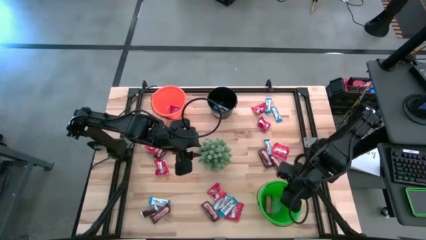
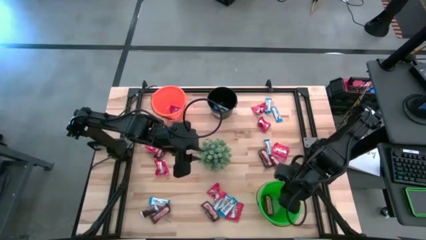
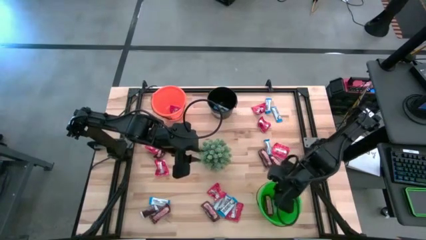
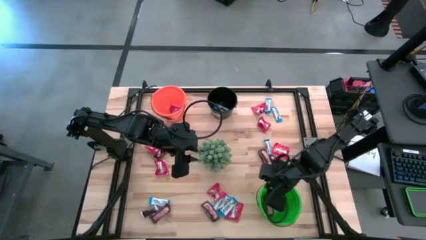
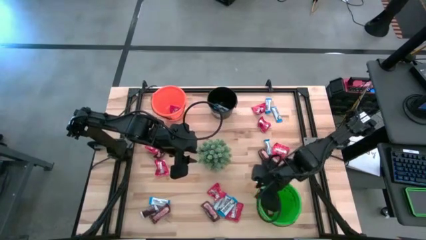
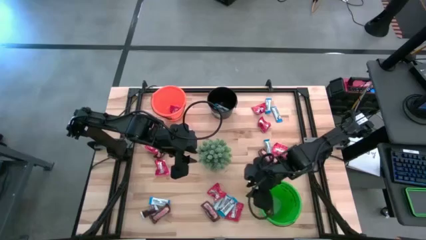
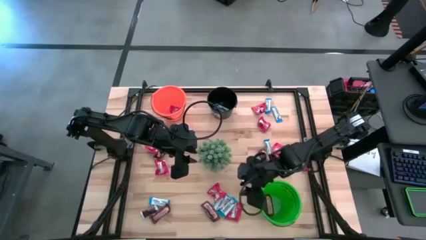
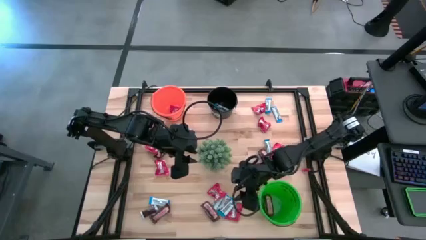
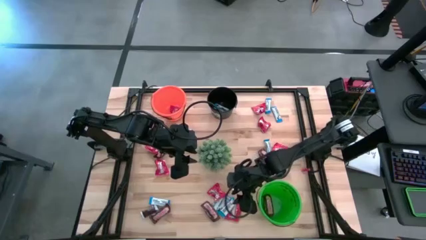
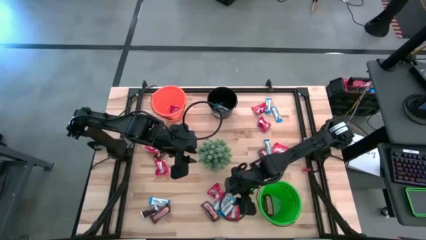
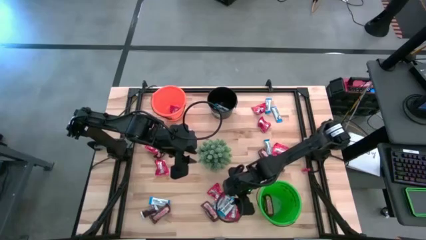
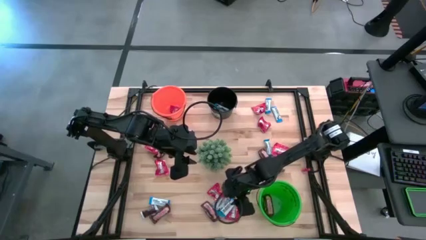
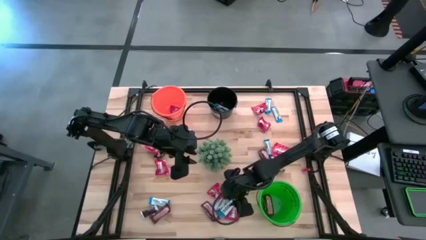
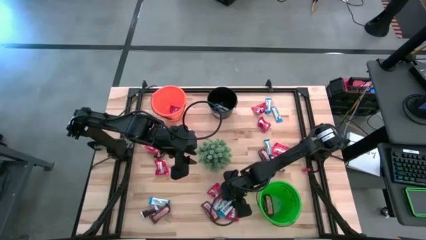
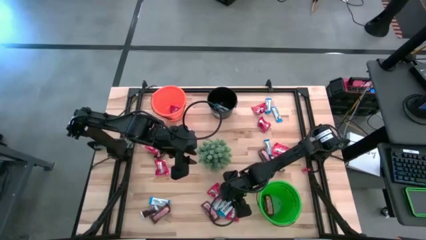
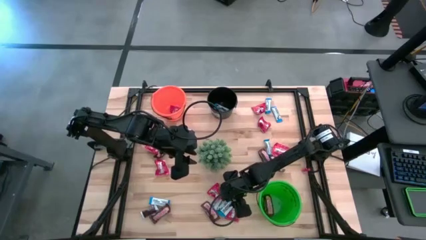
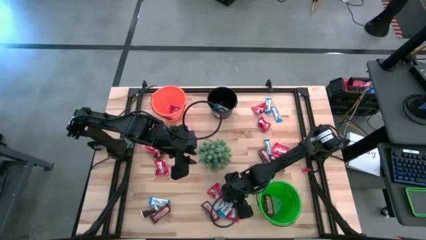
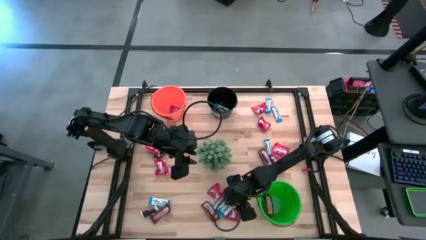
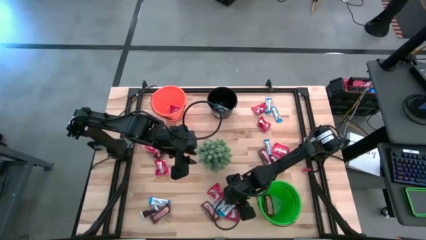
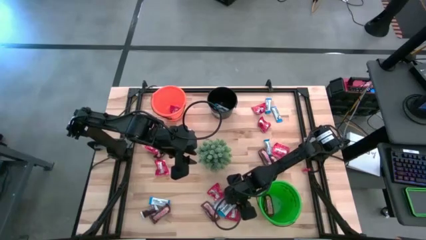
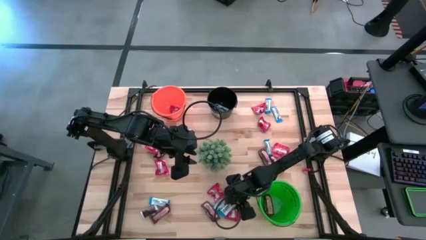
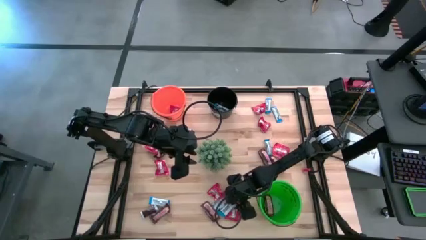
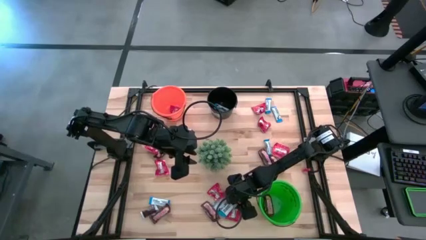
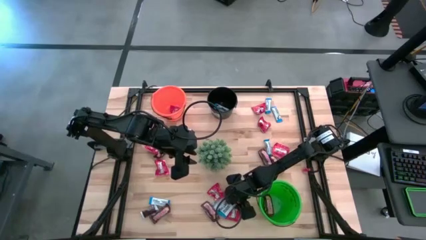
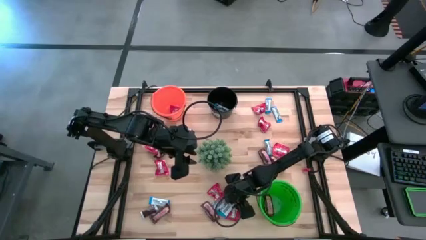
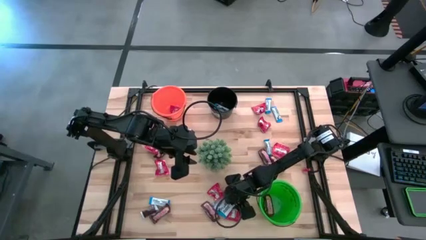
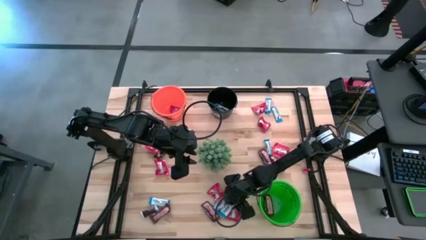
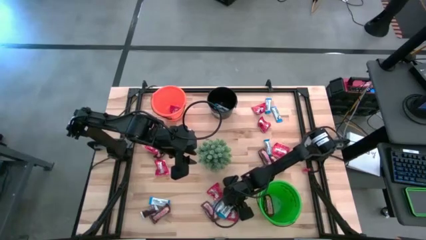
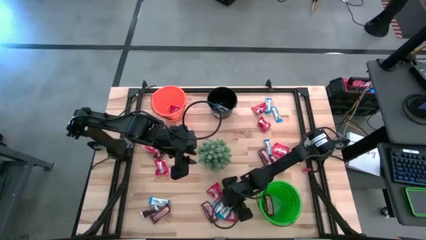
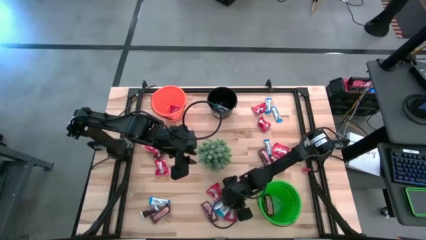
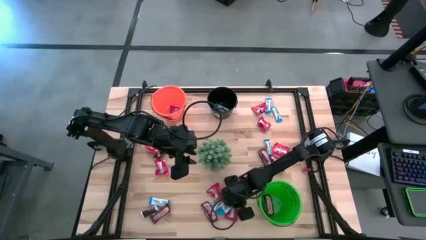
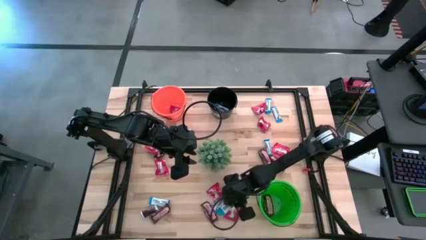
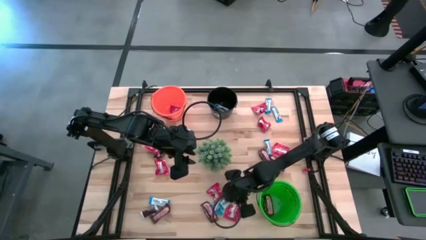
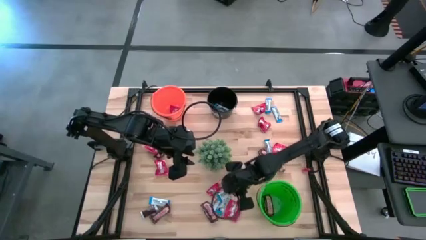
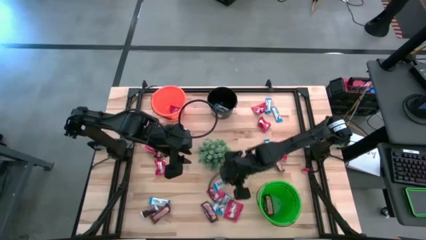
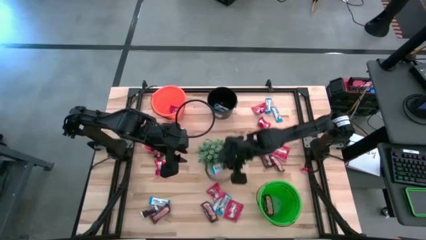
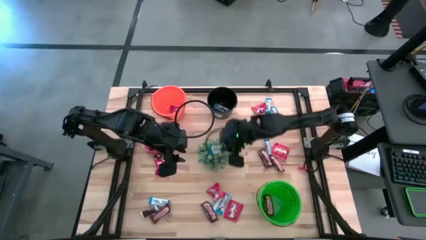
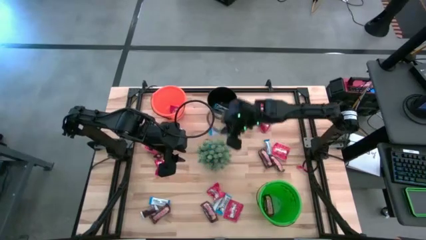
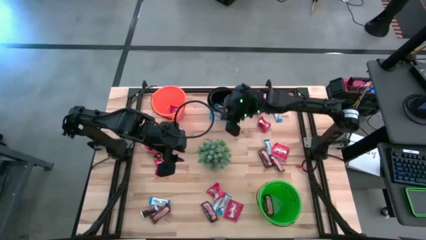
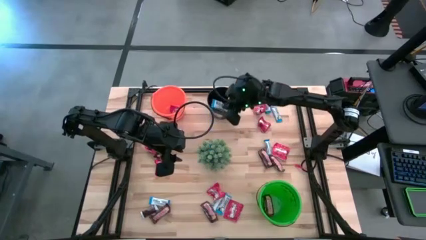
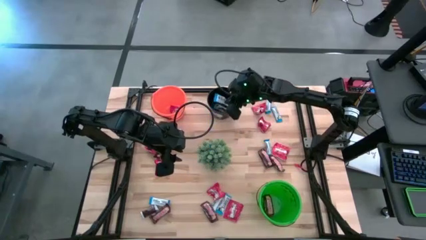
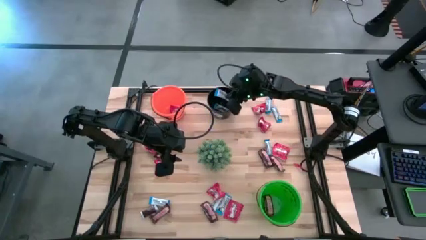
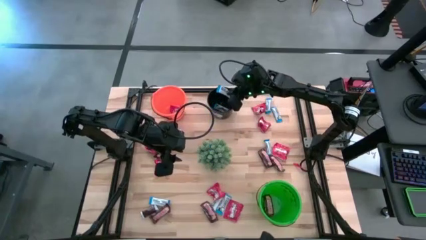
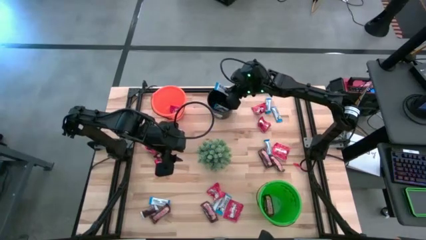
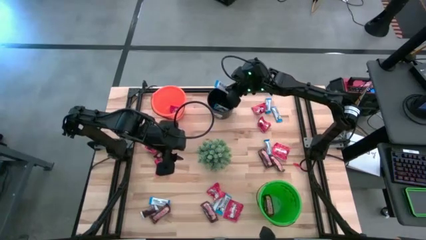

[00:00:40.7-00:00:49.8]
Task: Organize candy in baskets
Put the white chocolate bar into the black bucket

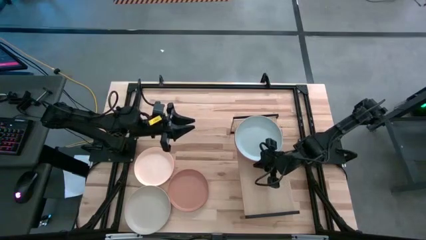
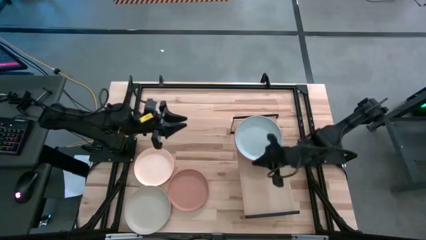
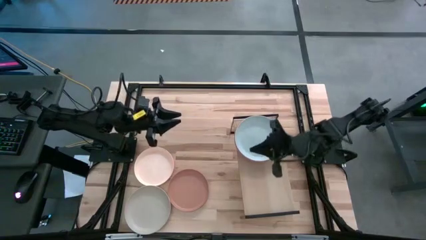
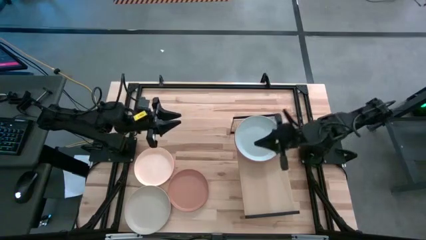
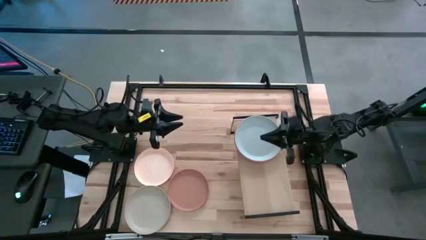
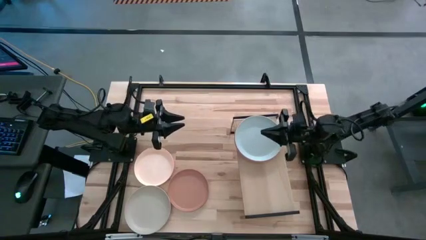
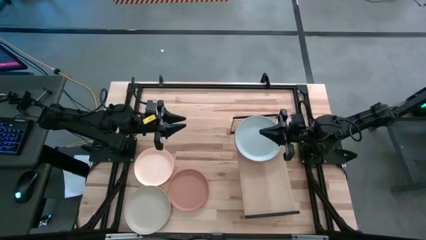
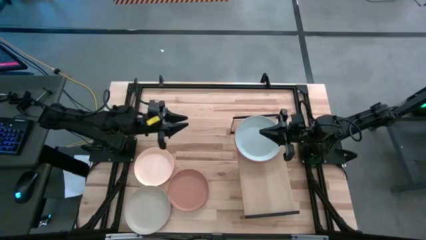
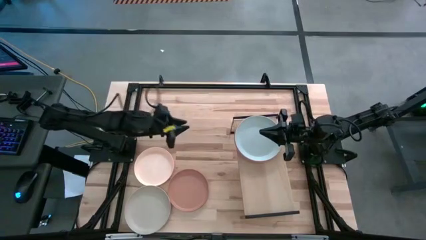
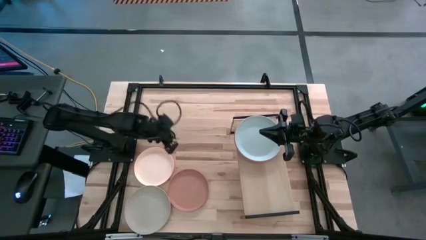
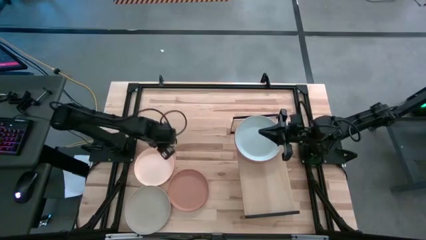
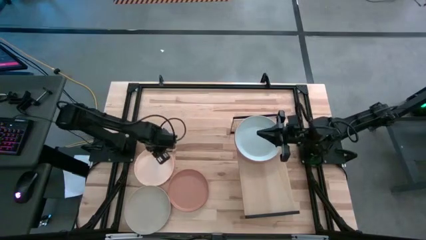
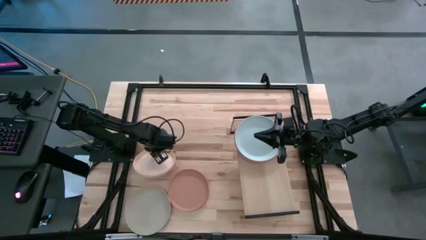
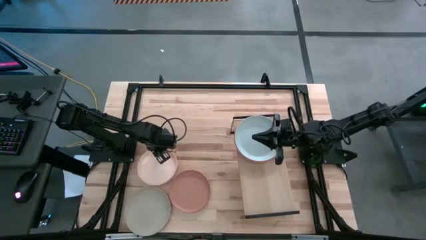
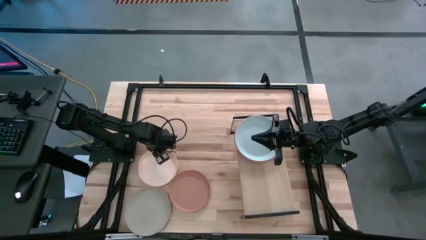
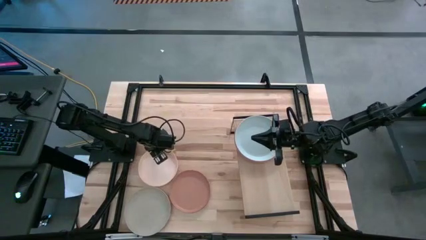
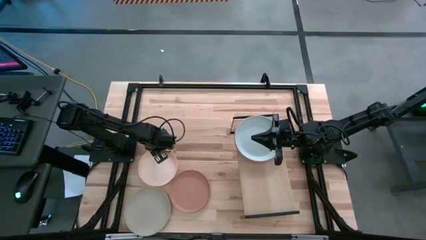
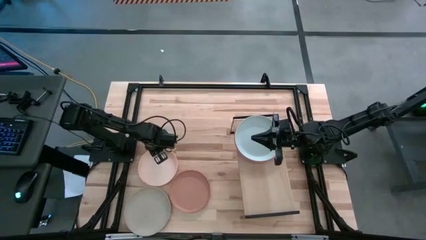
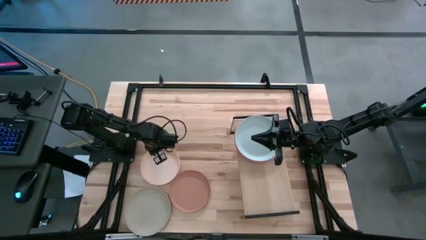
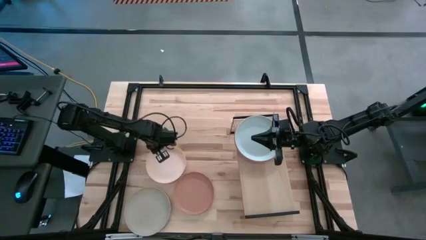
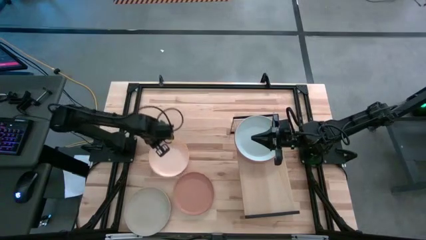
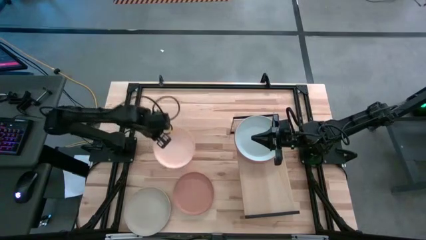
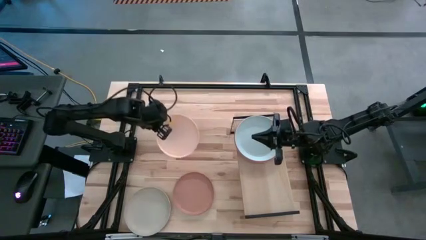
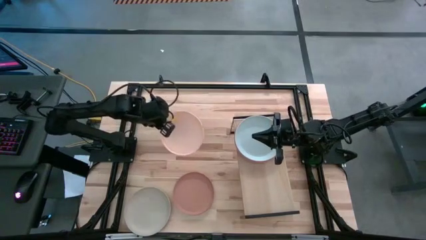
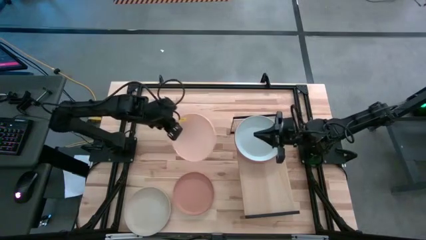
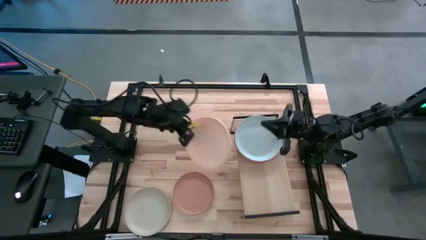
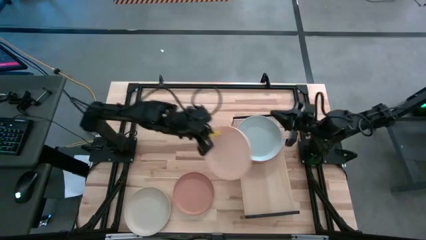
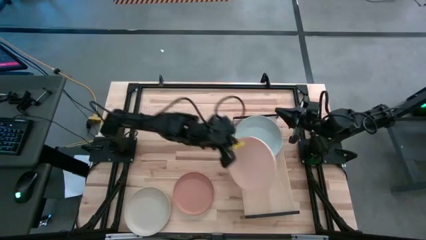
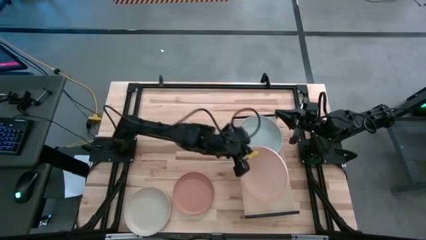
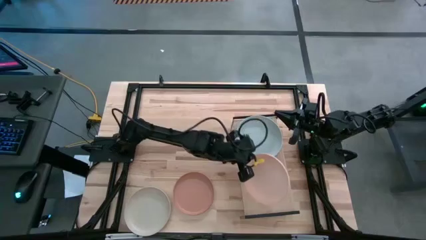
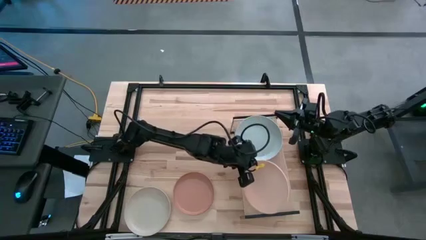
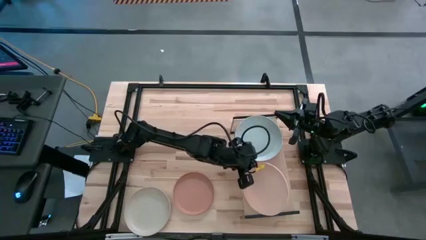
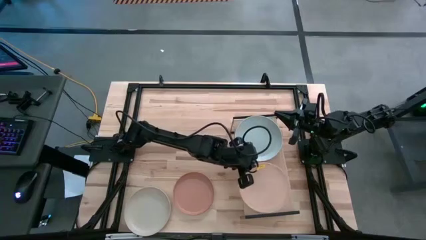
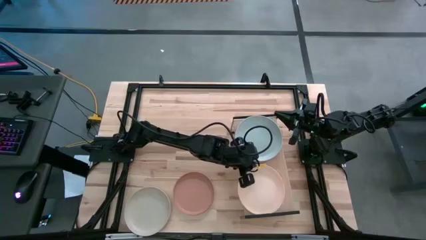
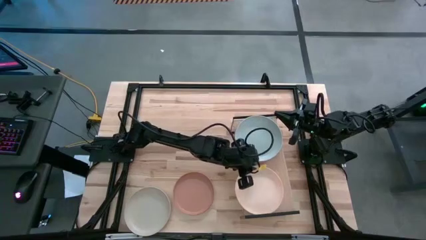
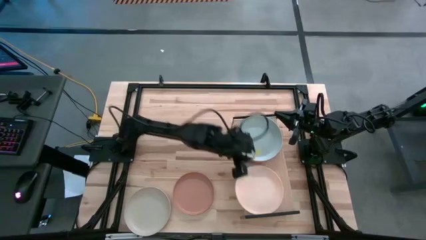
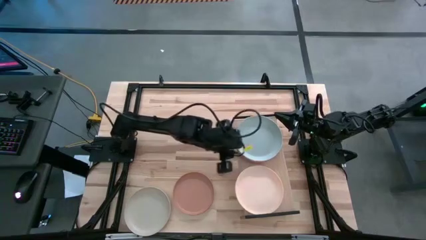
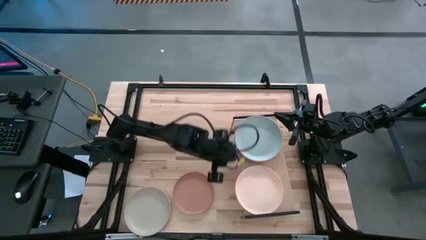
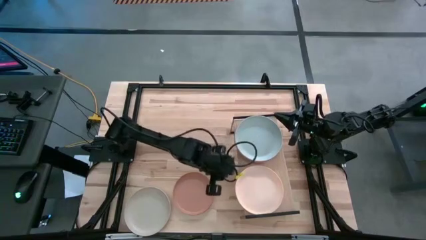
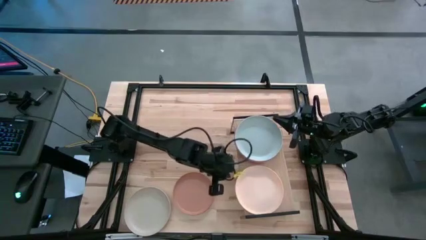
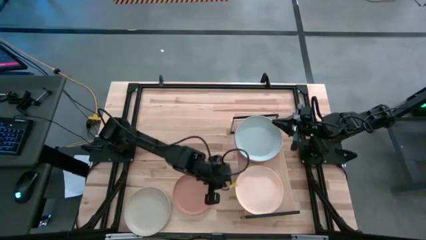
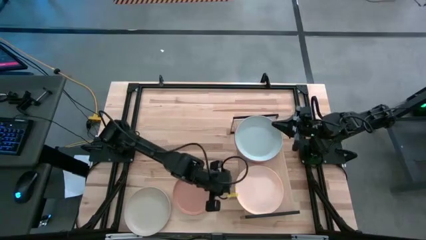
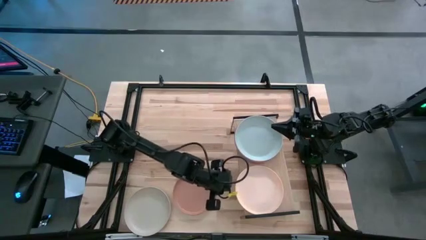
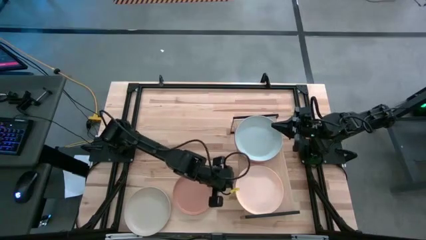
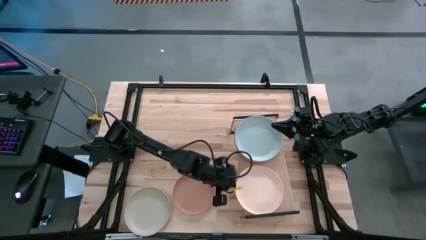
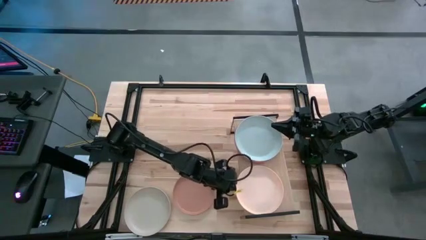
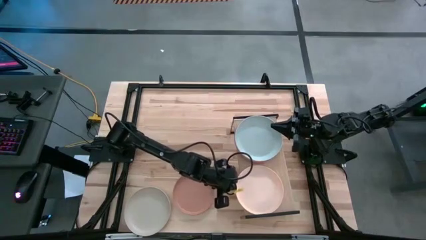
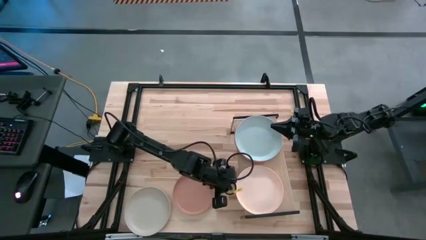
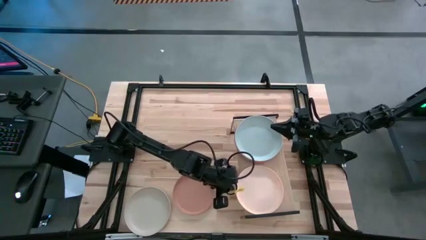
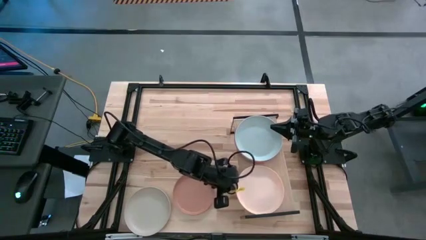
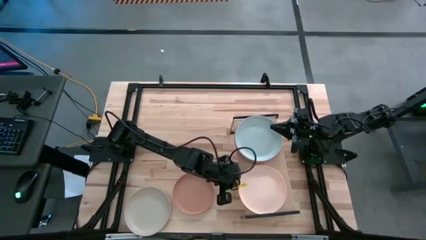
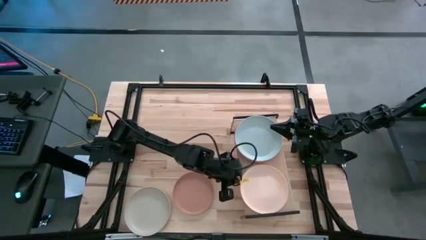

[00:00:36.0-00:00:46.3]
Task: Place and stack plates onto a shelf
Put the light orange plate on the shelf
